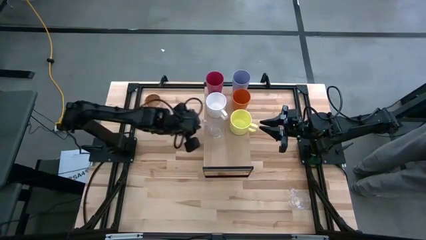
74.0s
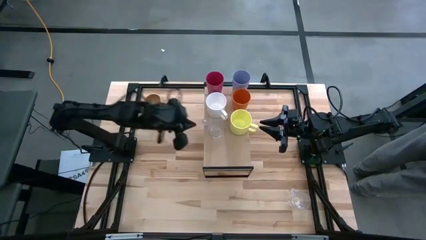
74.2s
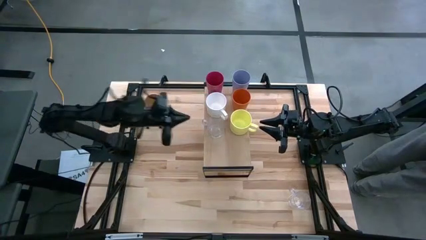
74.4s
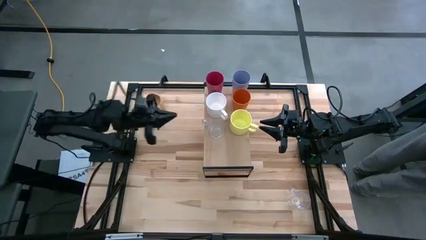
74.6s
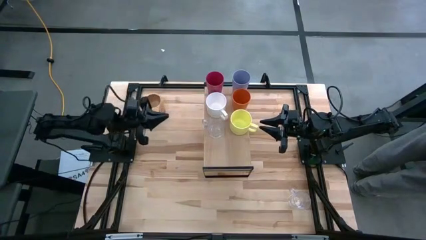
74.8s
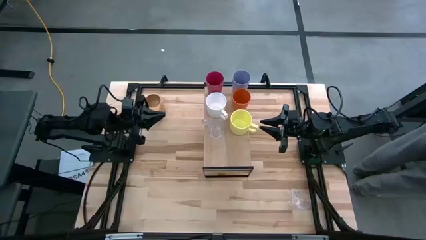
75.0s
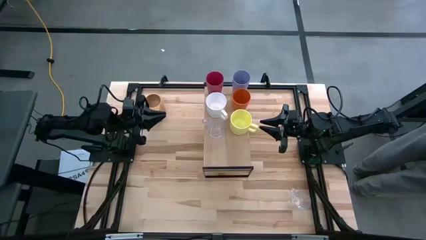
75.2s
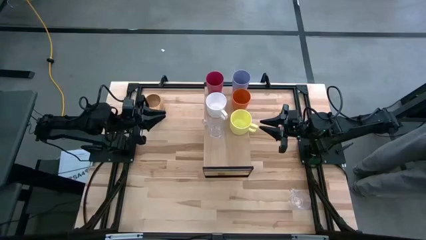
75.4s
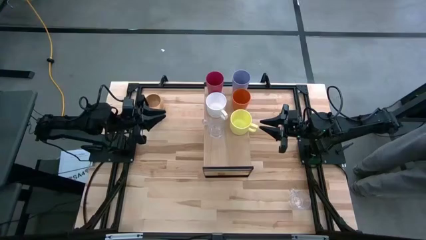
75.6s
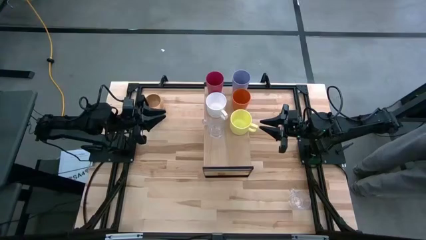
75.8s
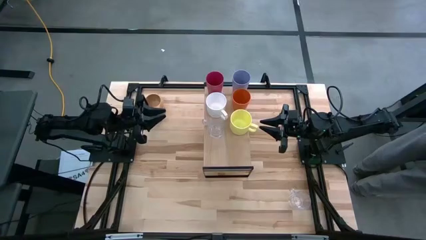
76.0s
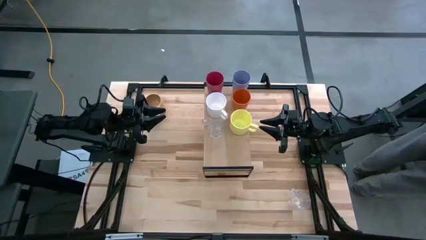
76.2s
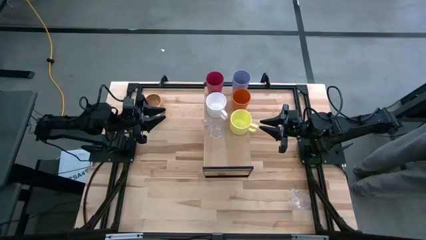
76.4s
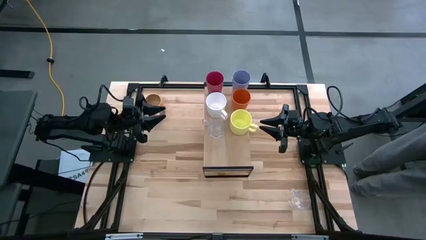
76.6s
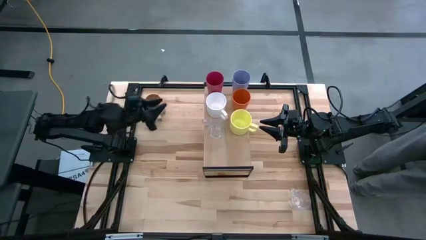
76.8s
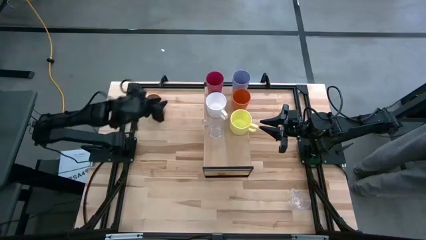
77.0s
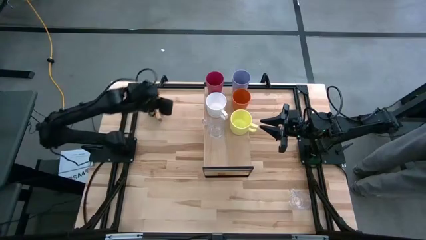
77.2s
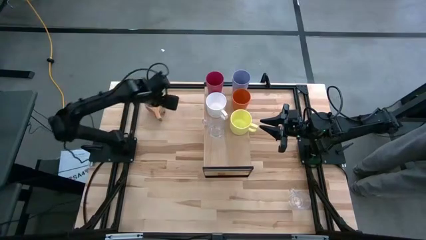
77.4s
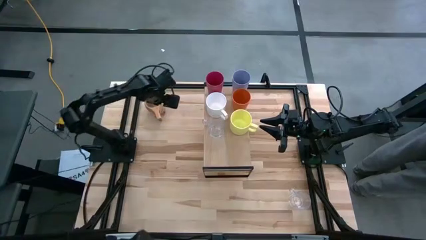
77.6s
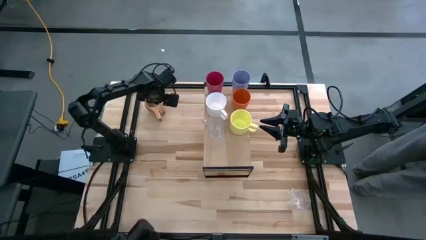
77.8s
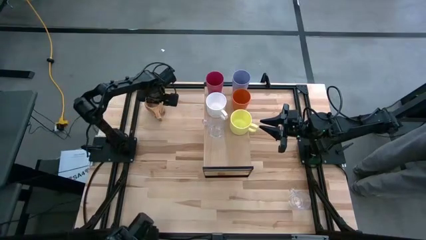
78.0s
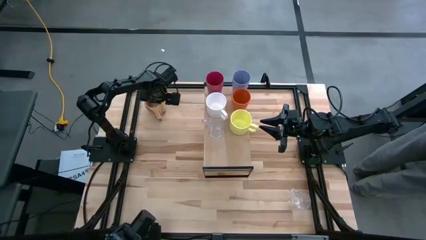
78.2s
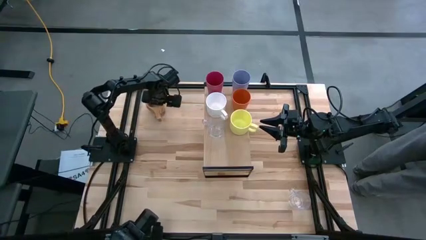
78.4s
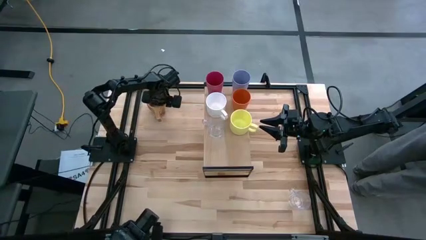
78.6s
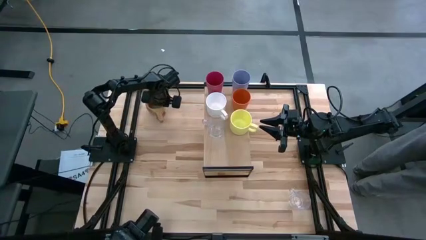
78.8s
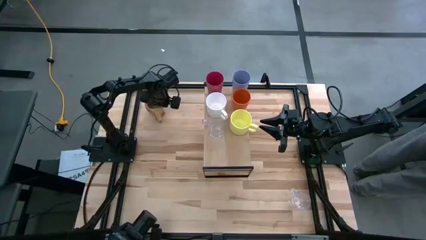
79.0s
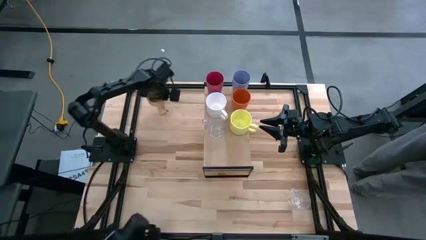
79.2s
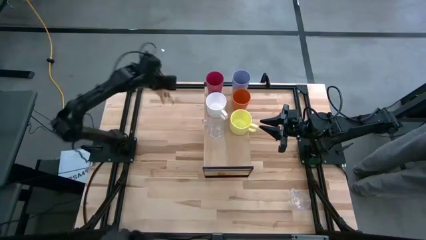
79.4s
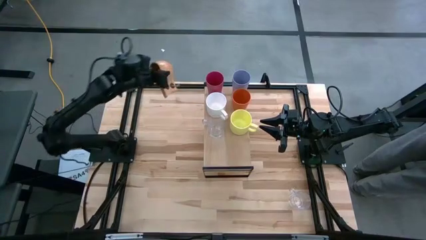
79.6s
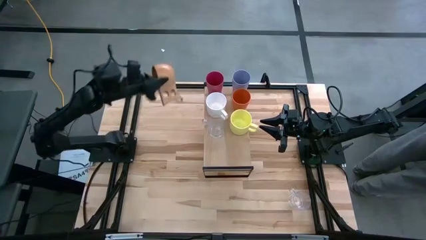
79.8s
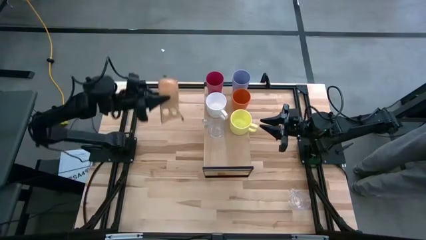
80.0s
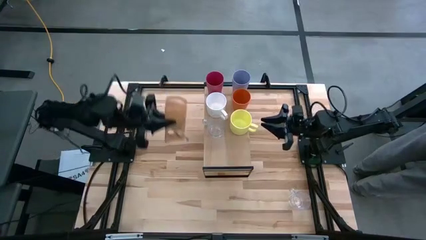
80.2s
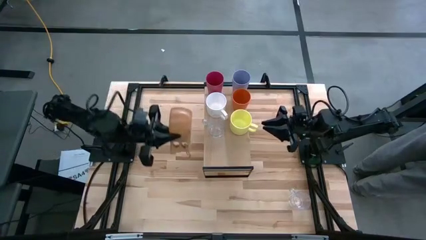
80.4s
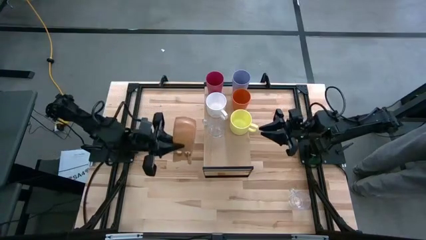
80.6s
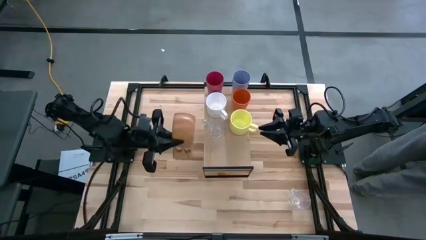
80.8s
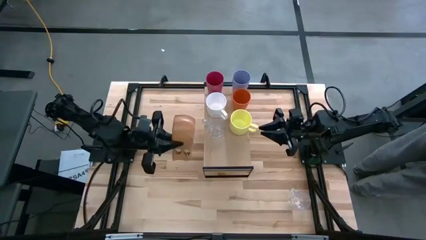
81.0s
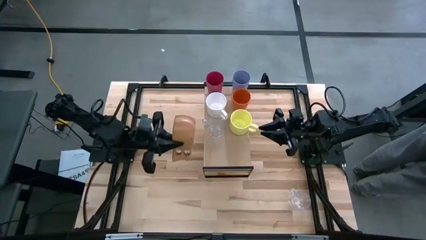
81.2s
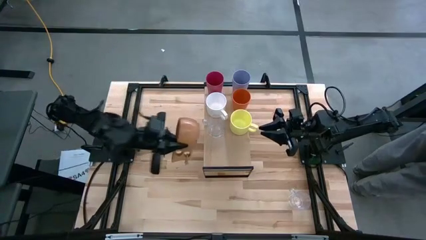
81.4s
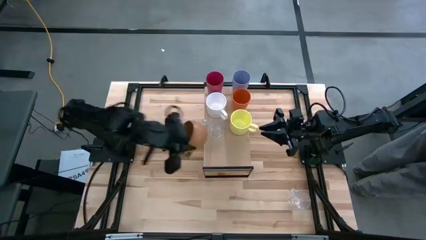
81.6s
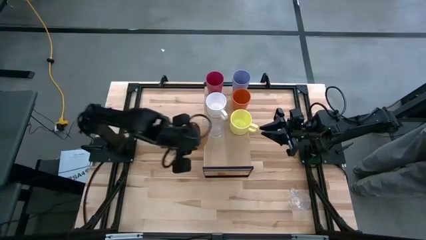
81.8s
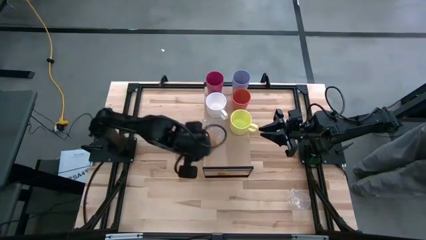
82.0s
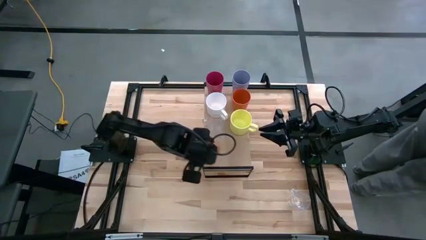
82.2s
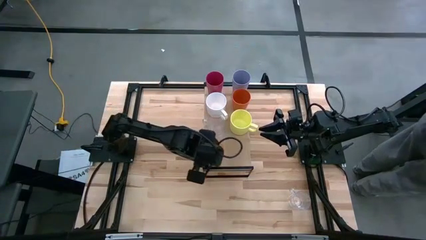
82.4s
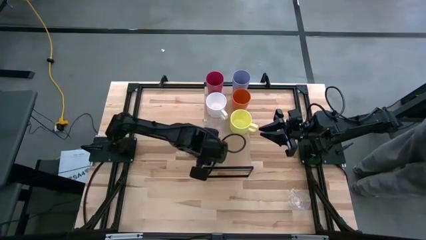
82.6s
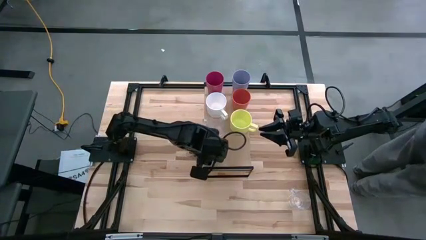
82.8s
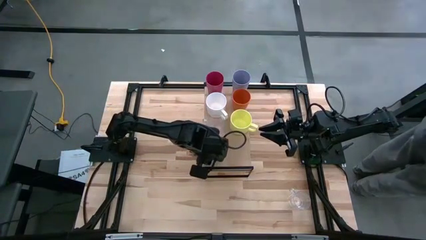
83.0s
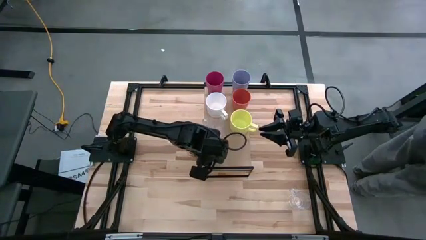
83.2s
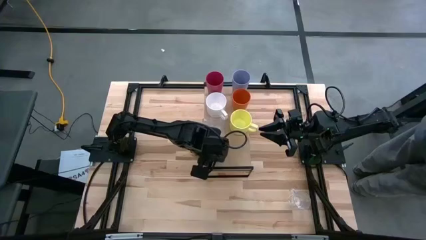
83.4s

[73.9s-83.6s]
Task: Stack small to large cups/mugs on shelf
Put the brown cup on the shelf

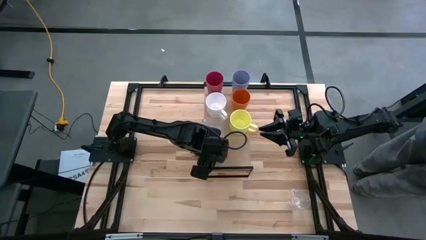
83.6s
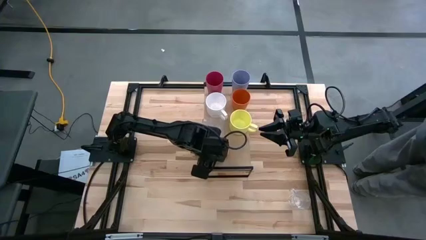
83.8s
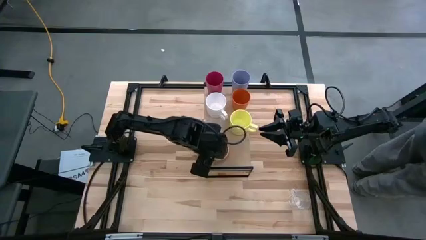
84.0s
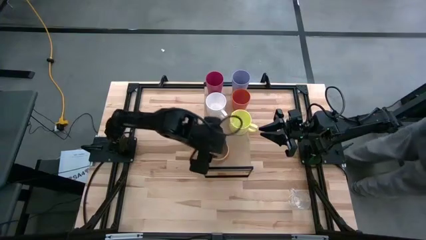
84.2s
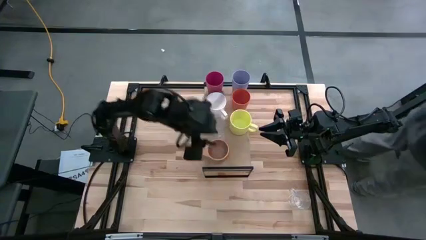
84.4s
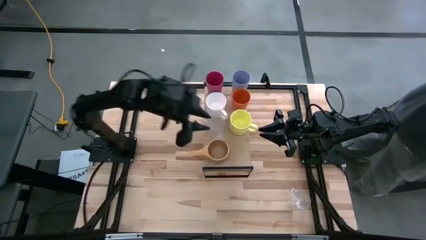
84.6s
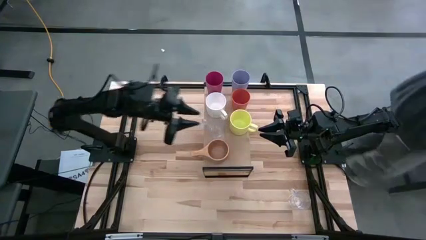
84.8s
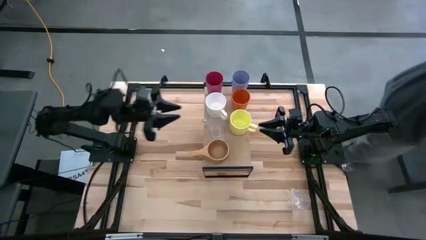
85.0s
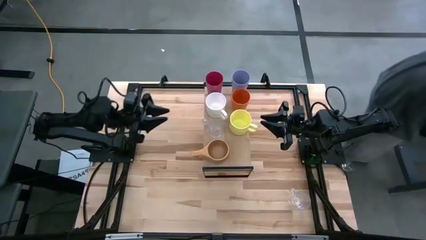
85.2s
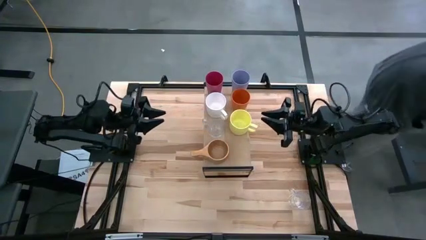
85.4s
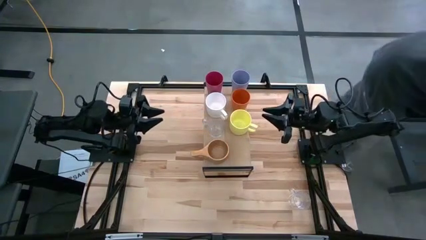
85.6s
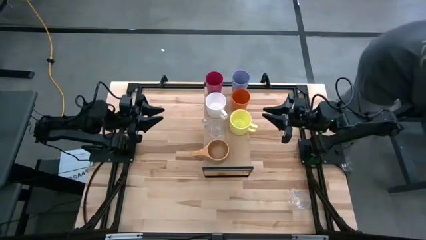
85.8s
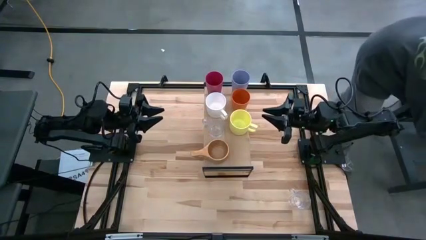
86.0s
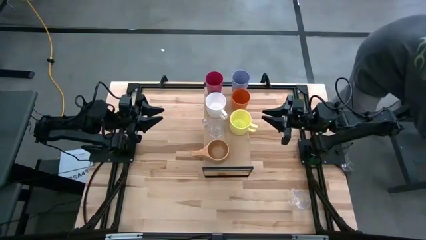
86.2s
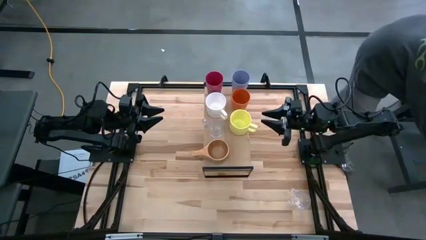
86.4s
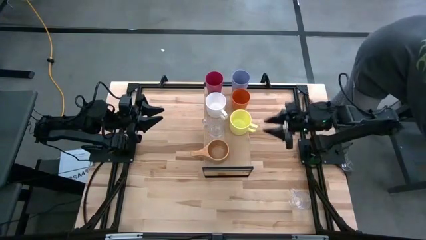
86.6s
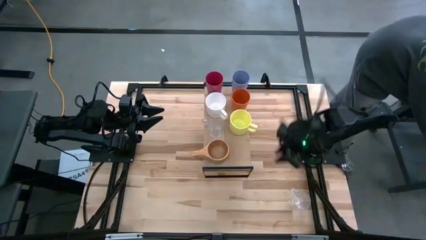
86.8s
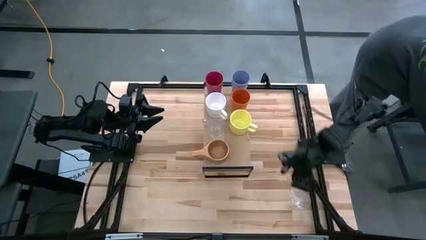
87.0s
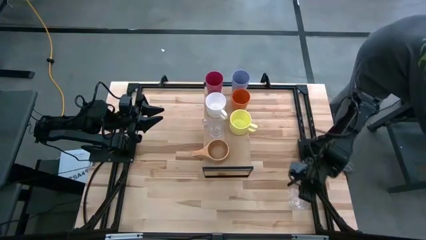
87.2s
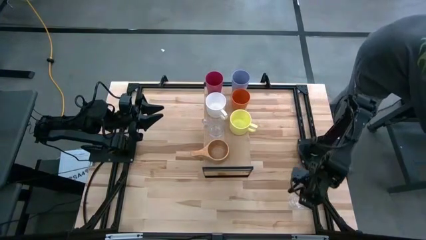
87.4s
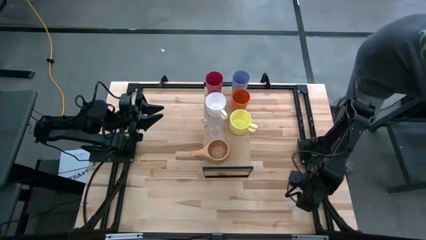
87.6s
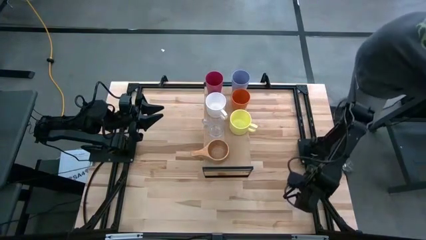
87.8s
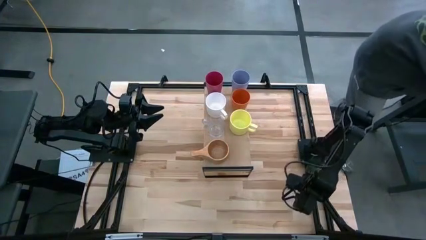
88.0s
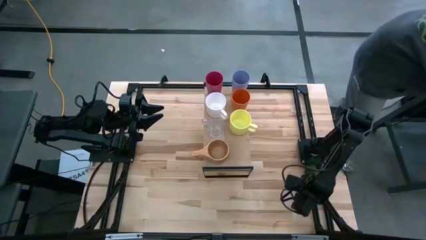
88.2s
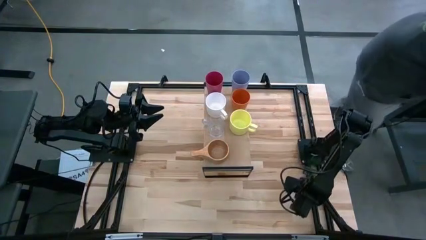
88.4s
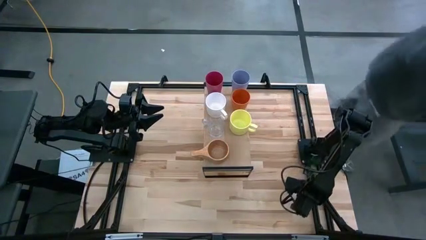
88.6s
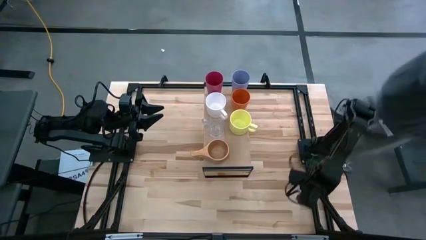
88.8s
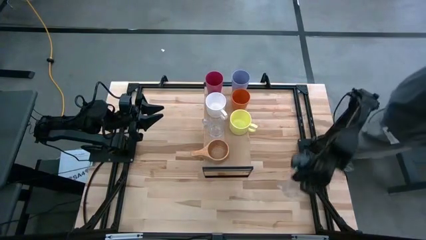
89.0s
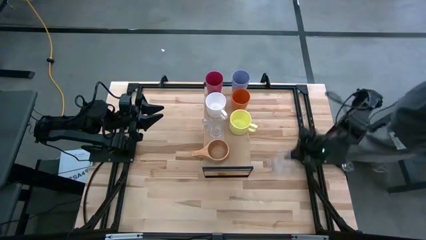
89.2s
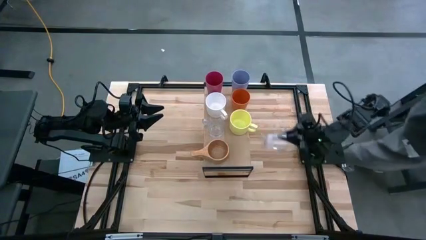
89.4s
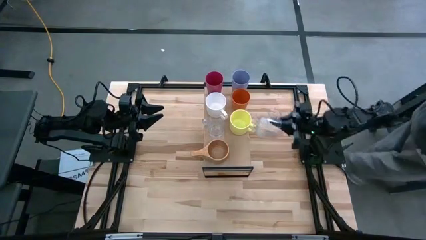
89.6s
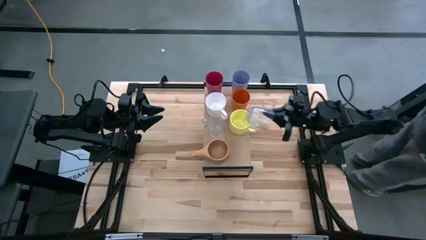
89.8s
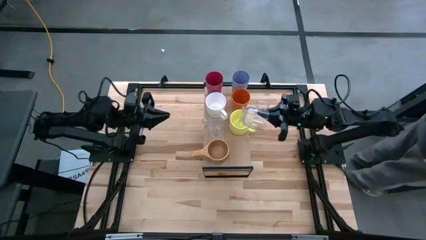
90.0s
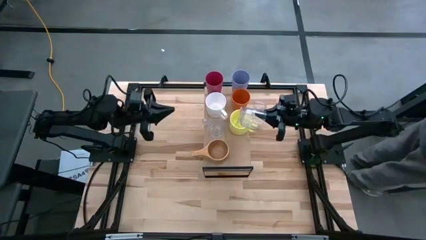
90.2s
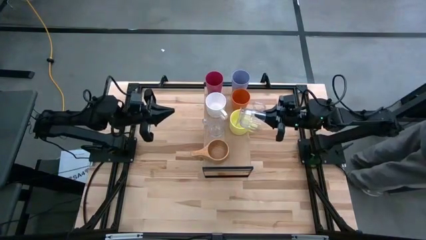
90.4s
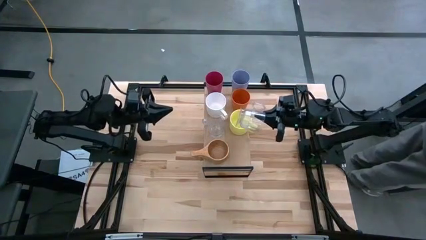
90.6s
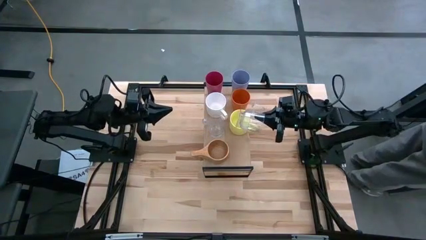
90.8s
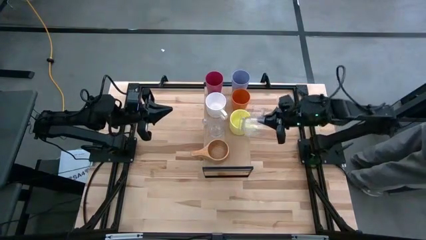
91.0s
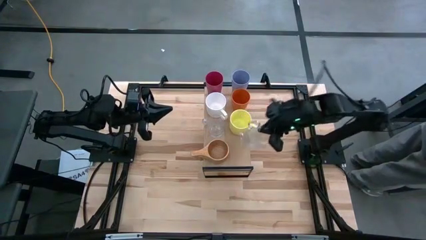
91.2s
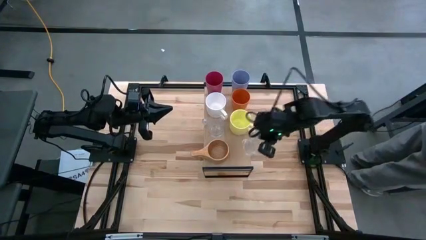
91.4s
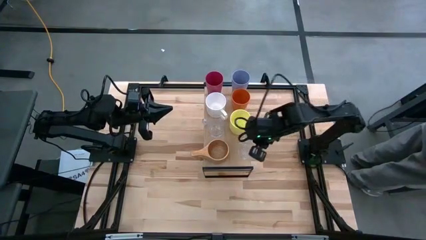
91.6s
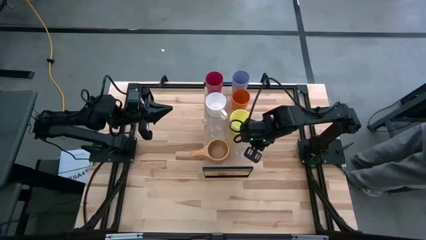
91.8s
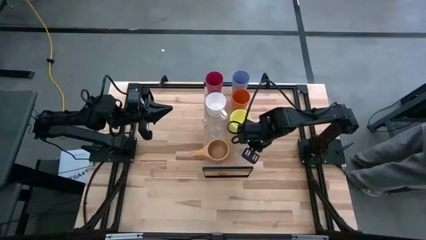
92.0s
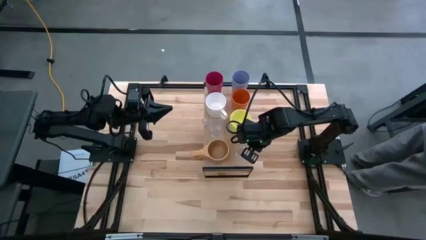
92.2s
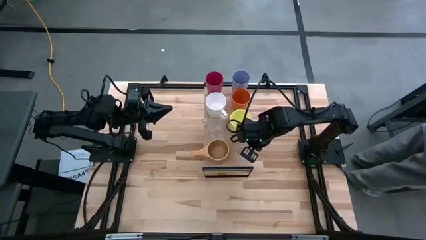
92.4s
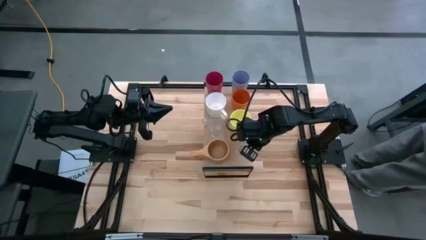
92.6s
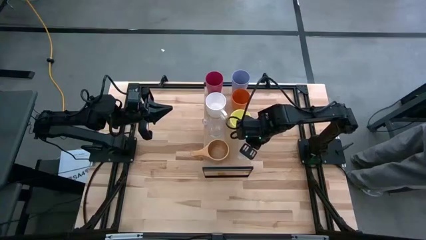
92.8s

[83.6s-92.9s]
Put the transparent cup on the shelf
